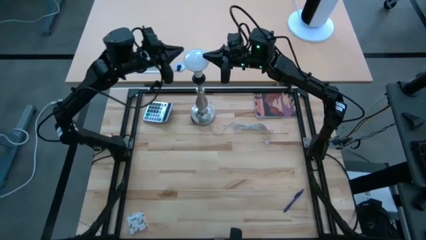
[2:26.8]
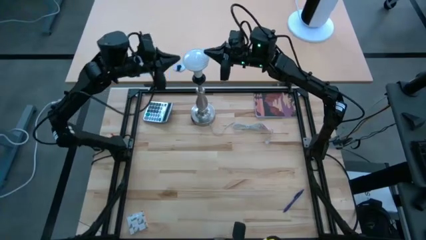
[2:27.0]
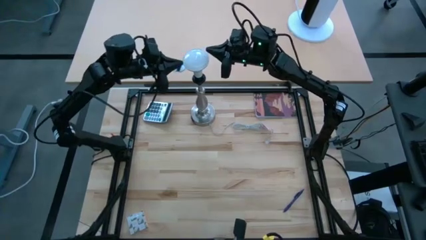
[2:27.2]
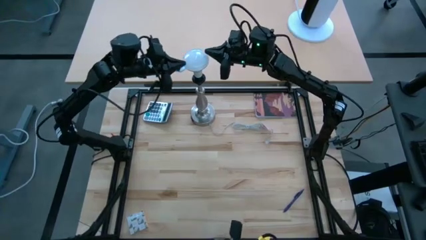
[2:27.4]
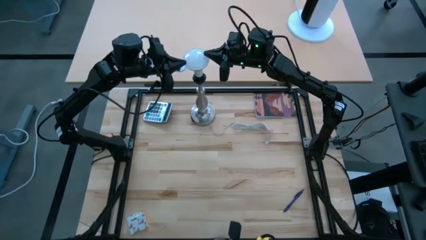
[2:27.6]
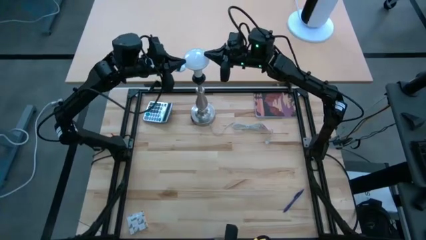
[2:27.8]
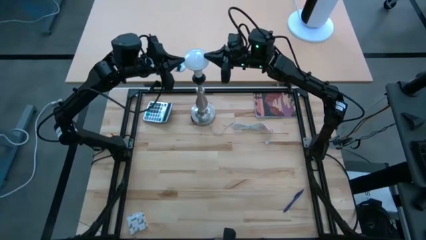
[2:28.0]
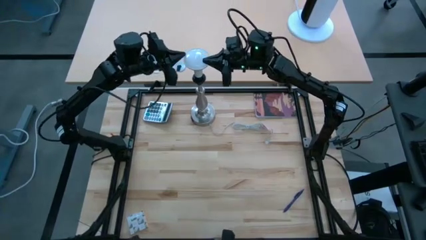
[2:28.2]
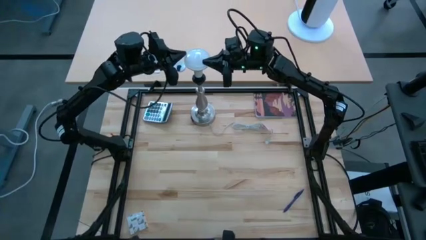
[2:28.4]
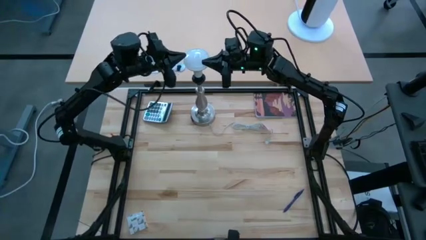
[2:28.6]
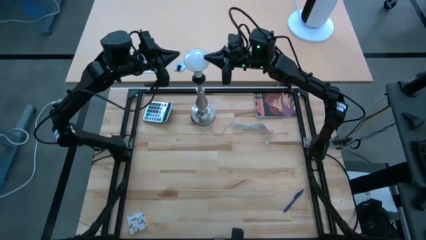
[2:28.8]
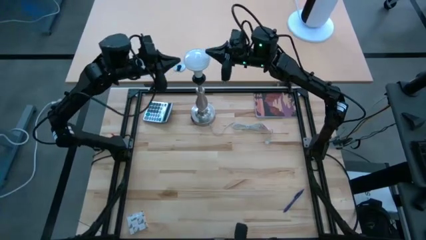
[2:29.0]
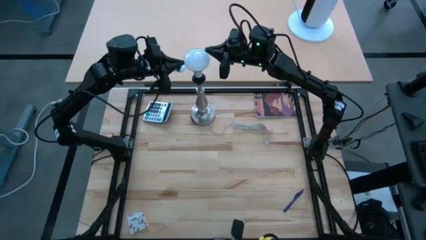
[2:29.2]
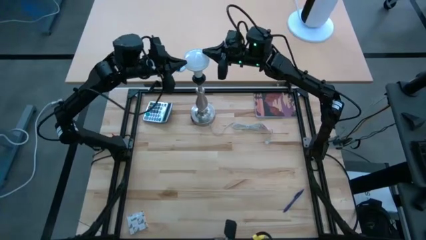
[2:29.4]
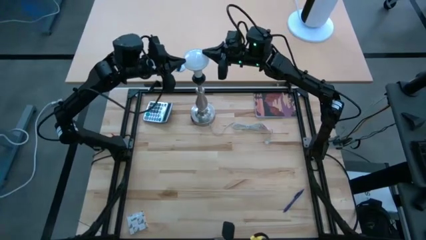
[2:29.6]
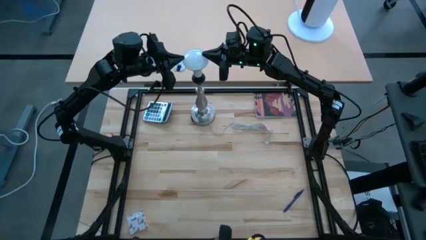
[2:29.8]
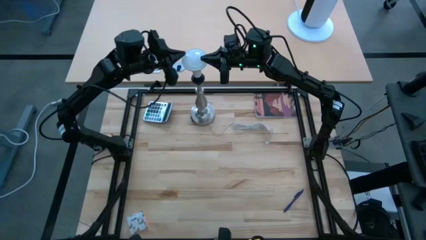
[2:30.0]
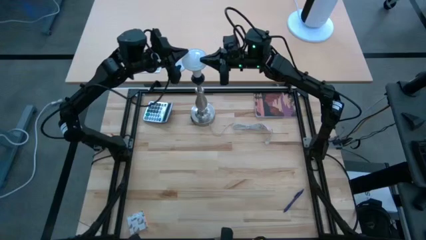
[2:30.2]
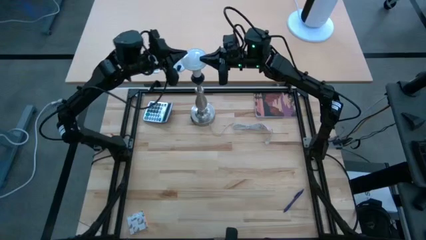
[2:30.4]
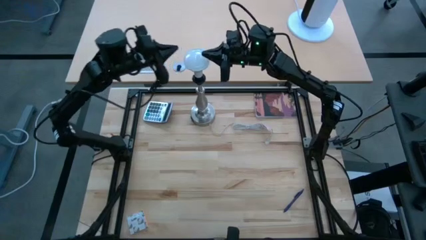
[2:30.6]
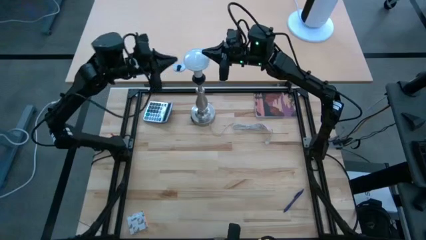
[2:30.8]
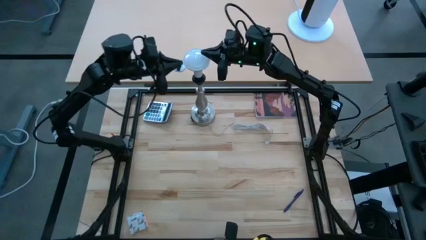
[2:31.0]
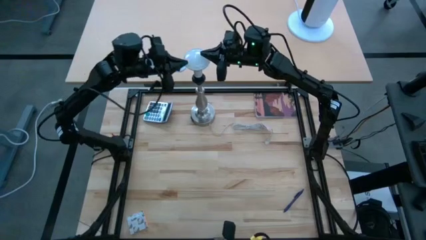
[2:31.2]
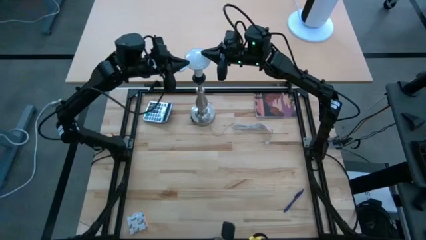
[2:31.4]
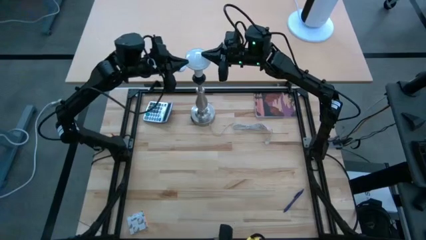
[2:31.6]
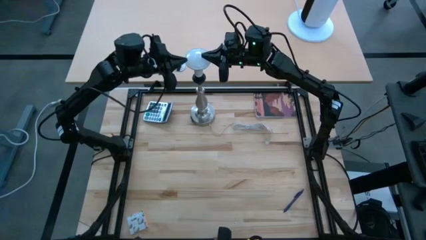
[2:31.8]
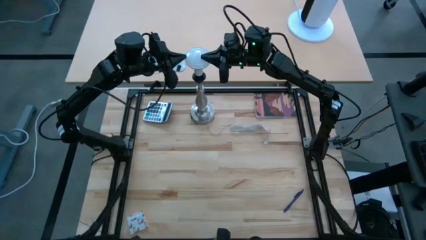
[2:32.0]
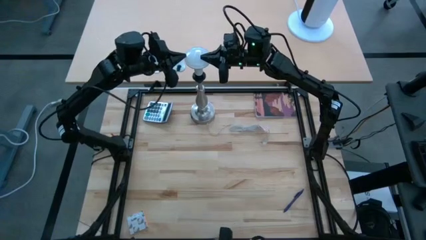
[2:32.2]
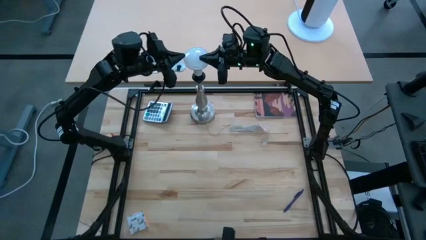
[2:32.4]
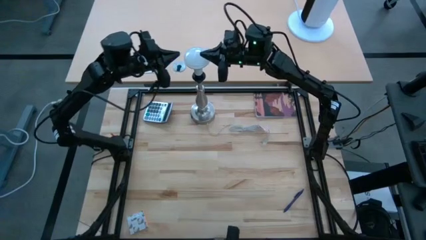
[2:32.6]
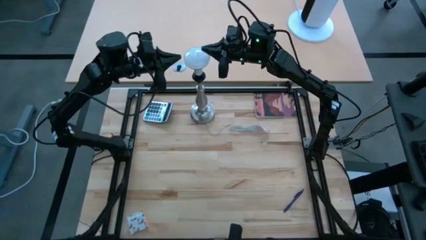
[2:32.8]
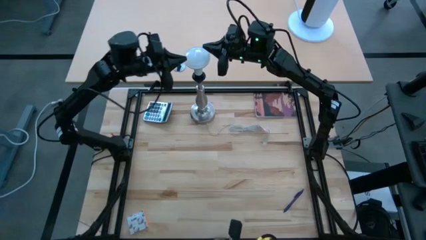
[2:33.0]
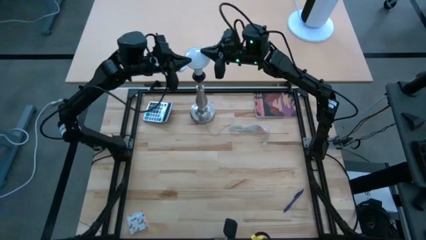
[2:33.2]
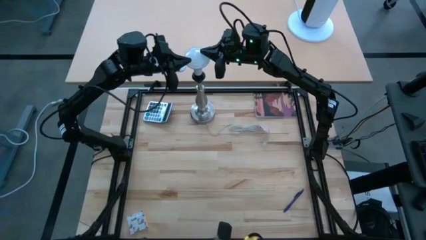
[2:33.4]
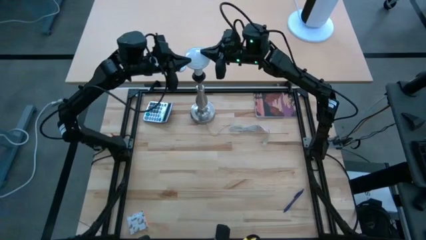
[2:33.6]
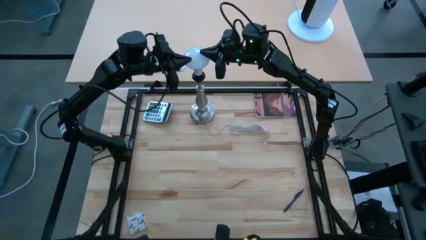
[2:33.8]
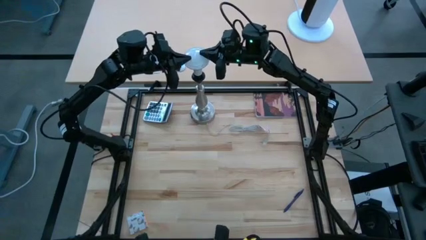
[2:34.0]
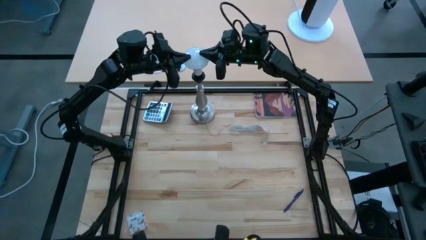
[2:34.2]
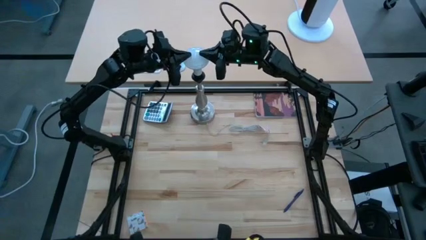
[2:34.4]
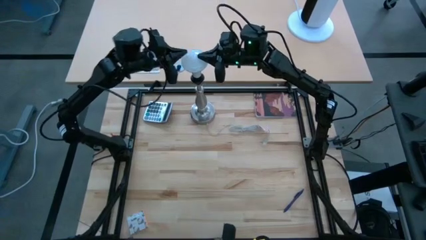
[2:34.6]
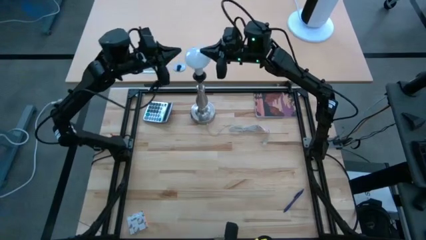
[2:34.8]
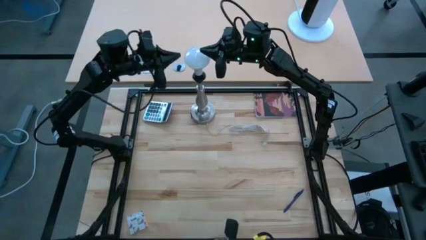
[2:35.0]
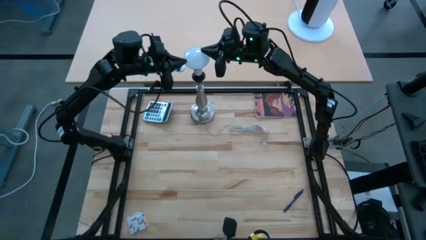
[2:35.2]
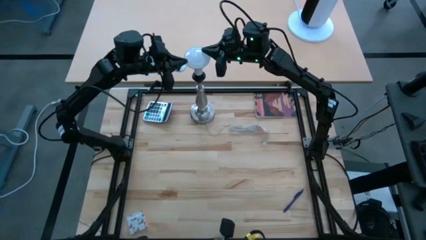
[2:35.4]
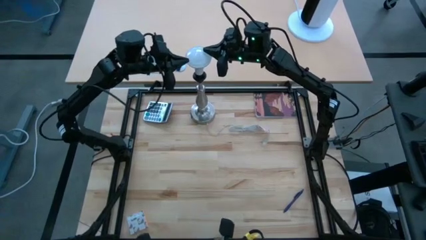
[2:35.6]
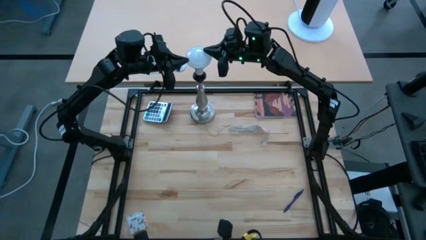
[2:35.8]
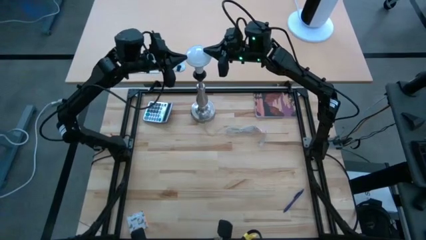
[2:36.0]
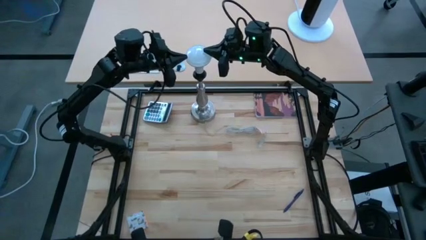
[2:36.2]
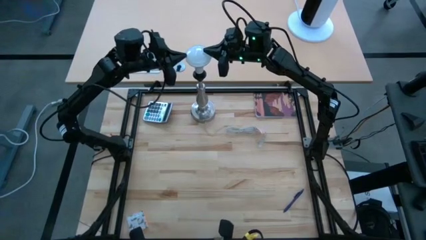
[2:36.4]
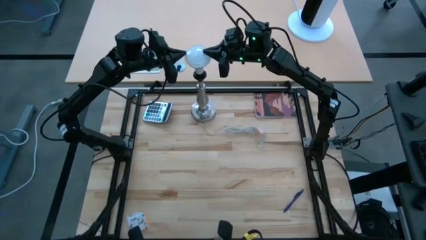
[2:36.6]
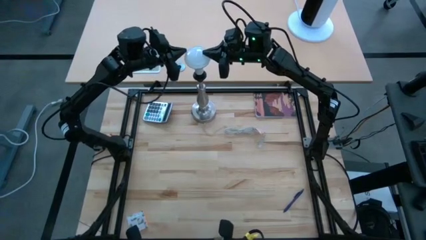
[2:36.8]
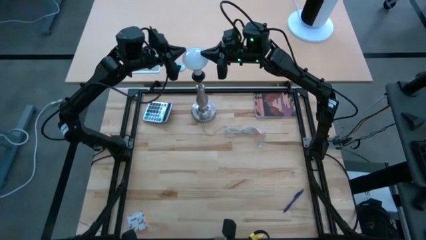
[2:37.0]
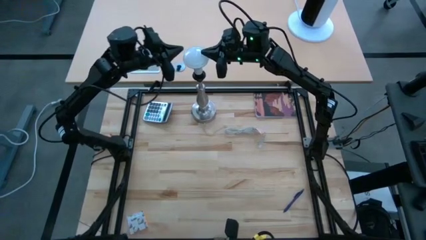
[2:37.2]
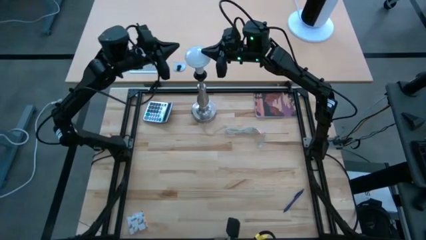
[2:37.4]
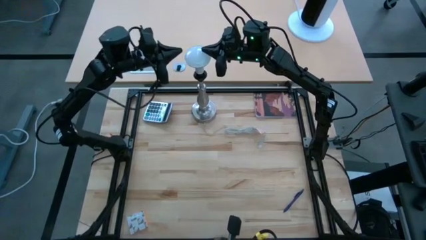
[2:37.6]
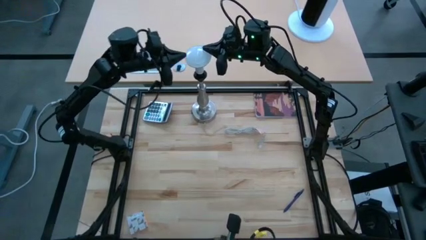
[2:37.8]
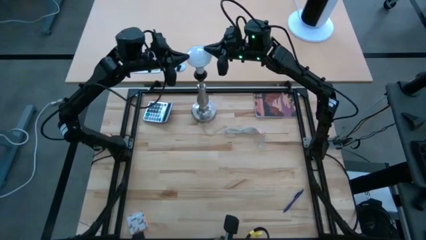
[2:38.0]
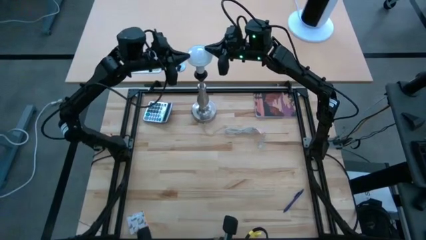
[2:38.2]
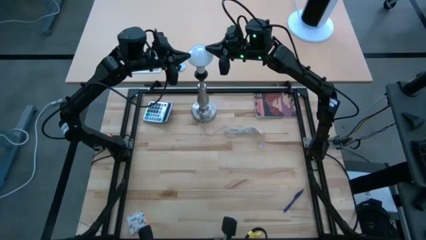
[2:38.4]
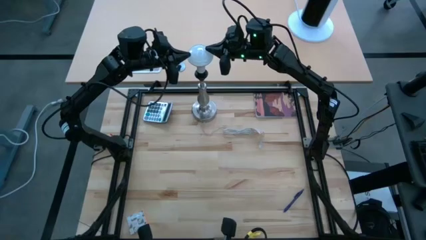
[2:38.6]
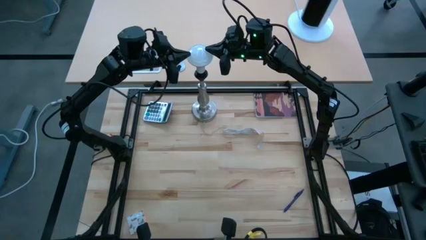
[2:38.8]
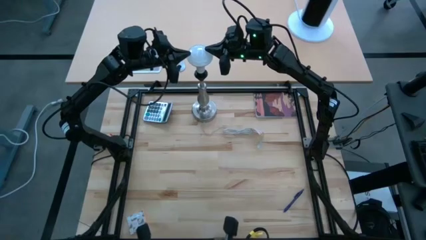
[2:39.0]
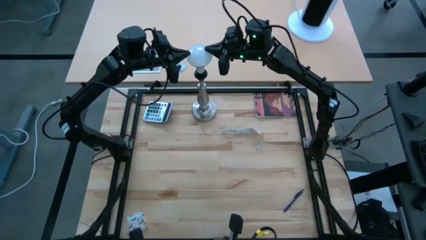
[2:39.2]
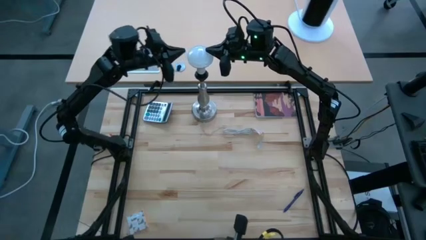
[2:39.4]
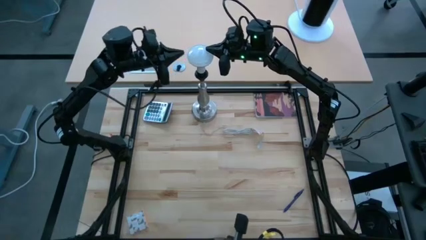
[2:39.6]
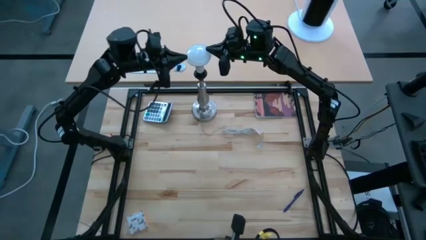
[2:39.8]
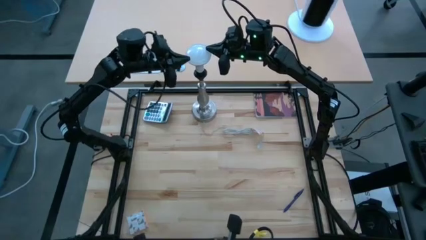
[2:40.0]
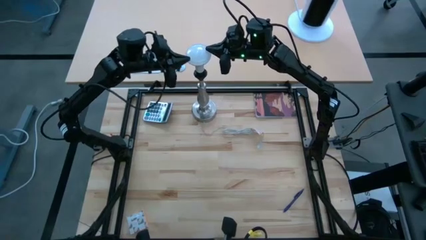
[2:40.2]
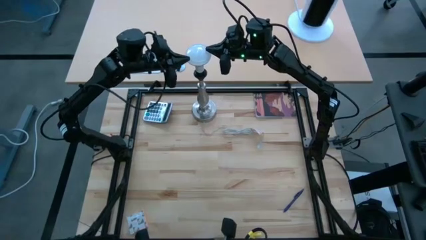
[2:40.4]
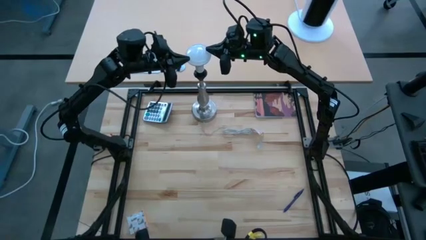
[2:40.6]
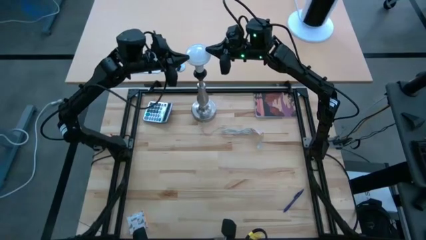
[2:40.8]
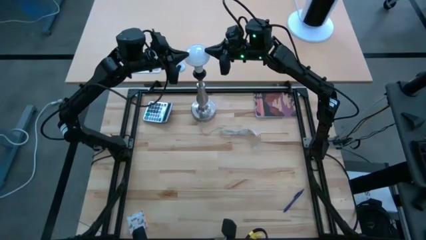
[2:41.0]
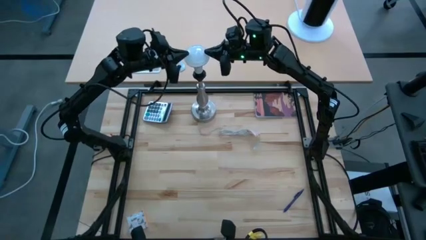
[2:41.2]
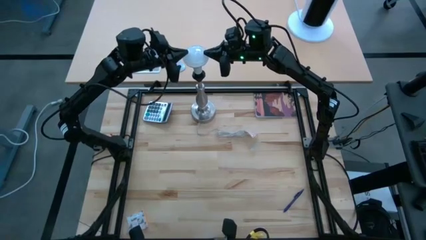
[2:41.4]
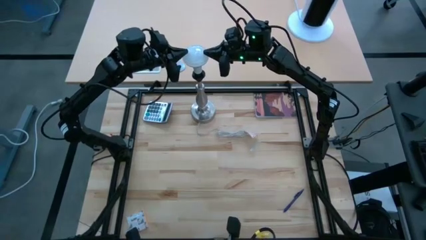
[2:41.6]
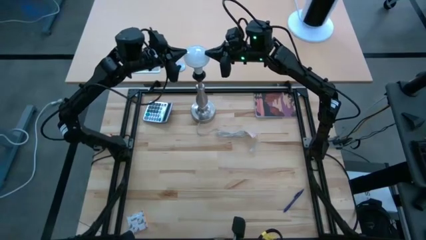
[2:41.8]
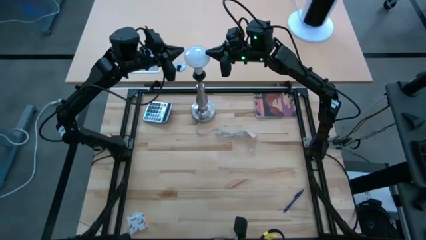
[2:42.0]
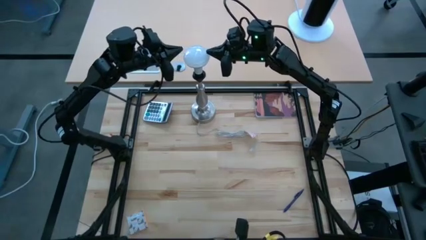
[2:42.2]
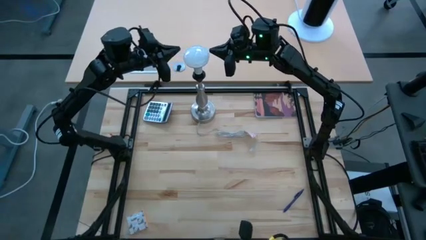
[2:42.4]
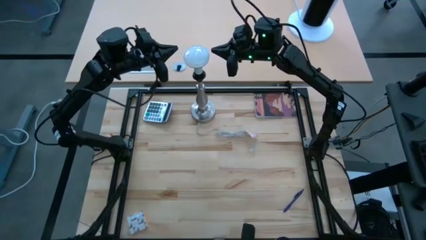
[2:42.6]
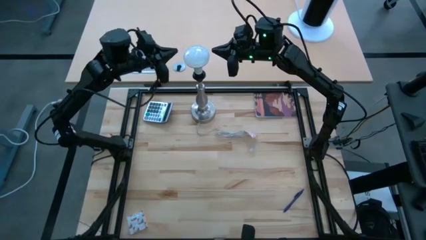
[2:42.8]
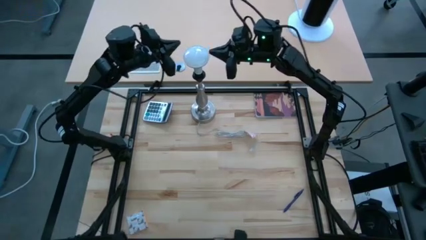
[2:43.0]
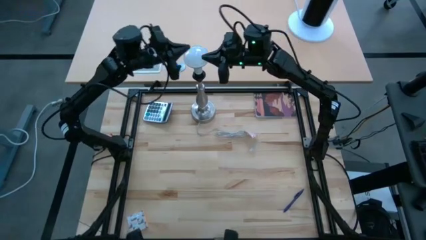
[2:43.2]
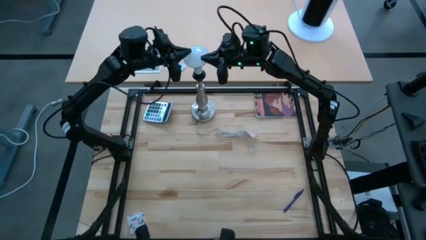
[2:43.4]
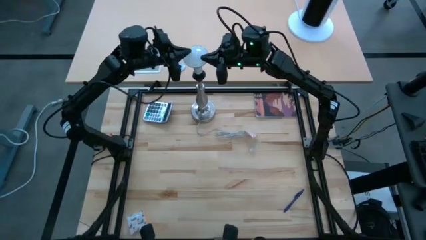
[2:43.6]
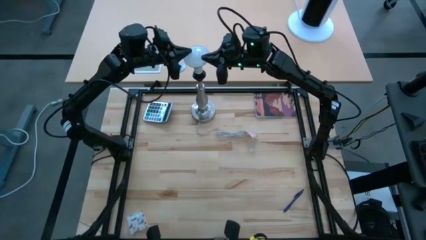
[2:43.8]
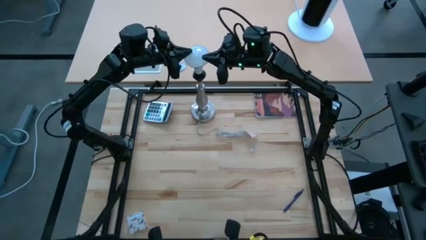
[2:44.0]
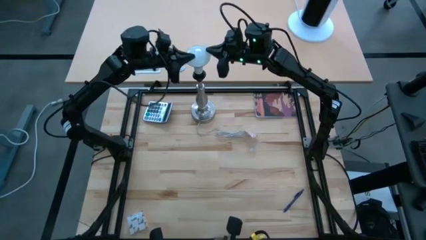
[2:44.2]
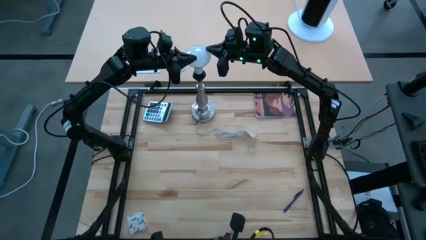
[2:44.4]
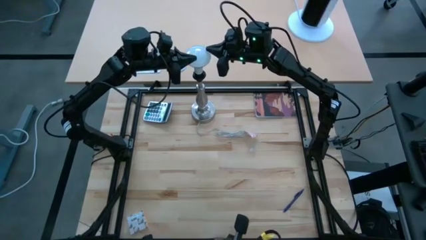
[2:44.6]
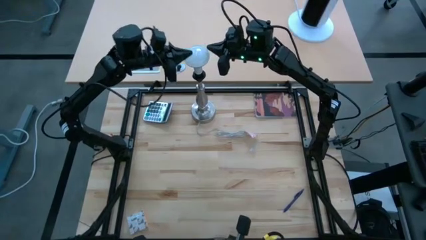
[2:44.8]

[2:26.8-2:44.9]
Task: Screw lightbulb
Insert the lightbulb into the table lamp
